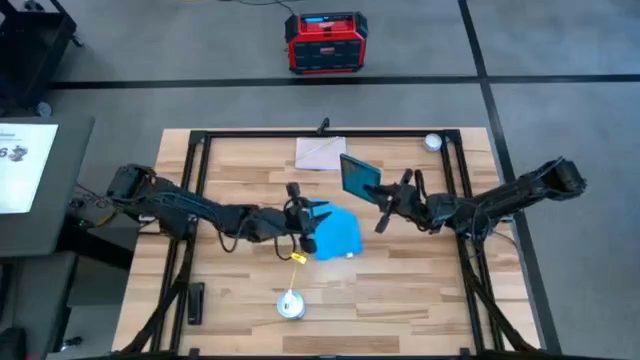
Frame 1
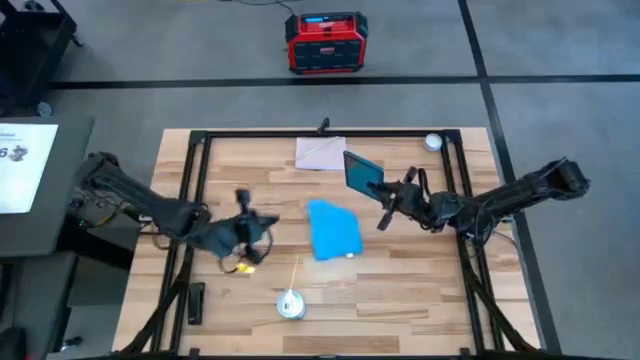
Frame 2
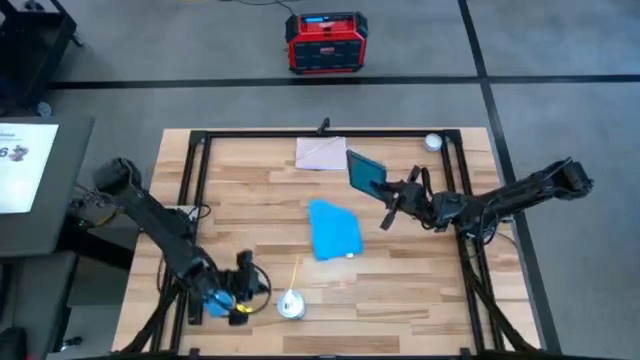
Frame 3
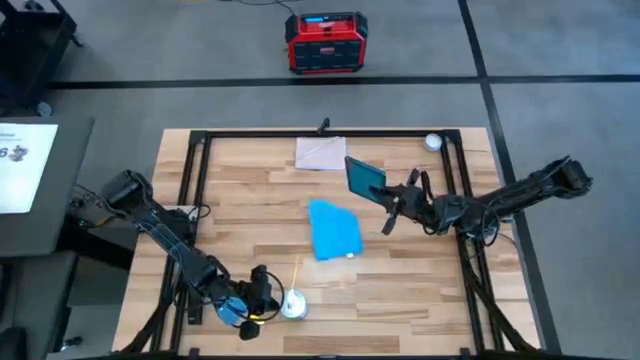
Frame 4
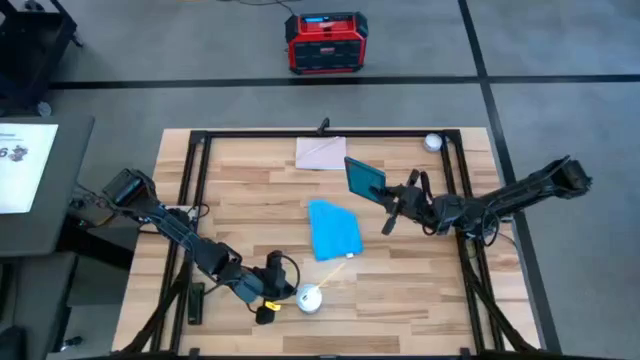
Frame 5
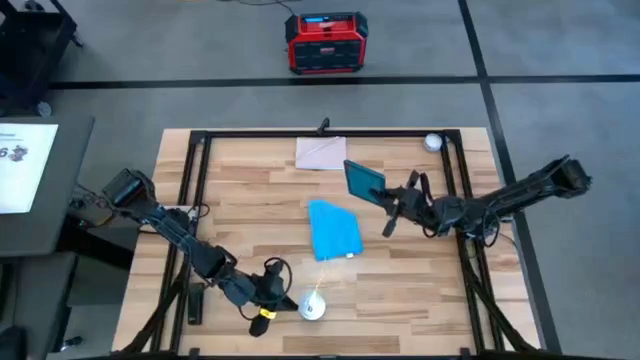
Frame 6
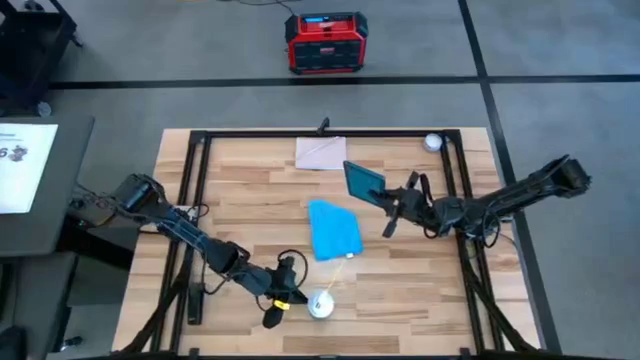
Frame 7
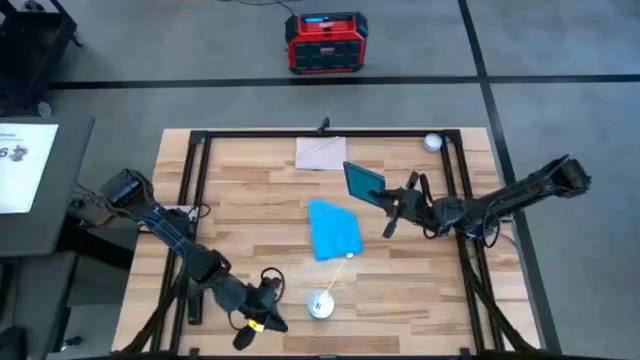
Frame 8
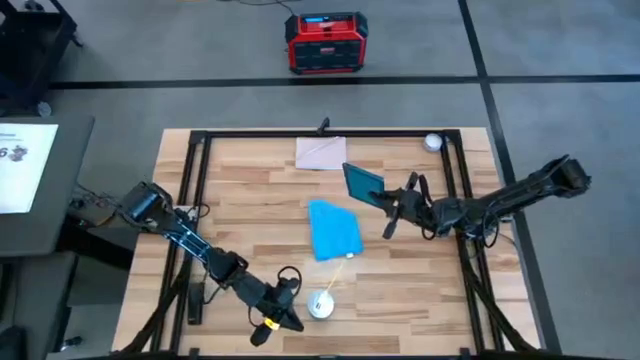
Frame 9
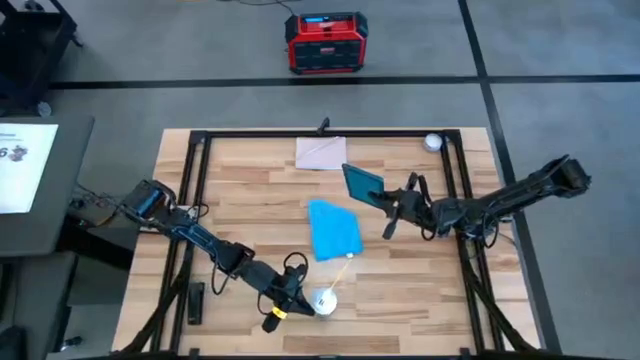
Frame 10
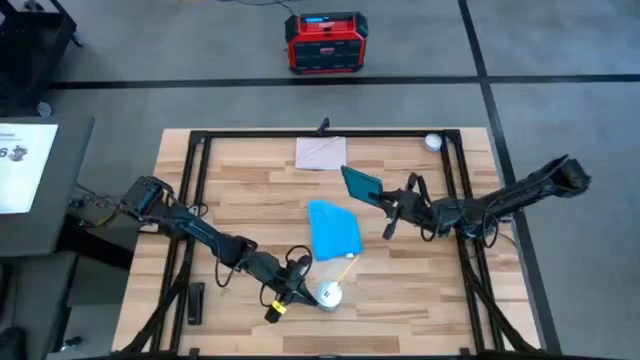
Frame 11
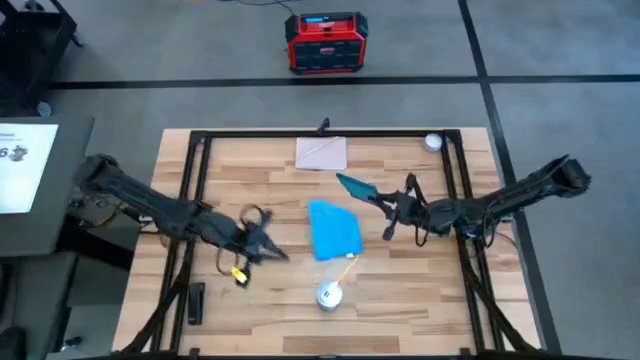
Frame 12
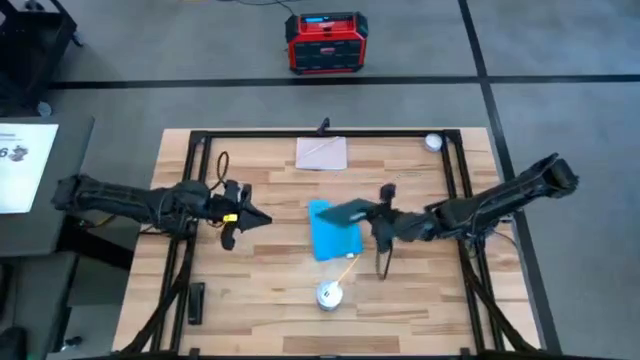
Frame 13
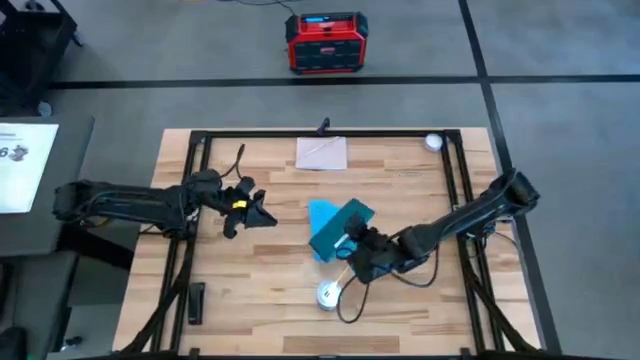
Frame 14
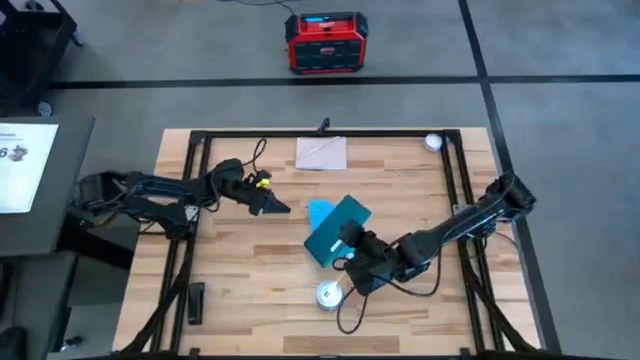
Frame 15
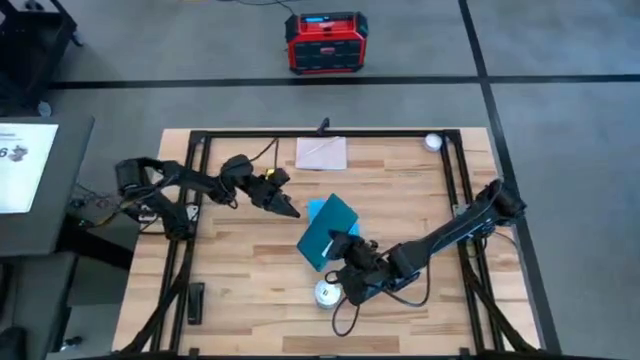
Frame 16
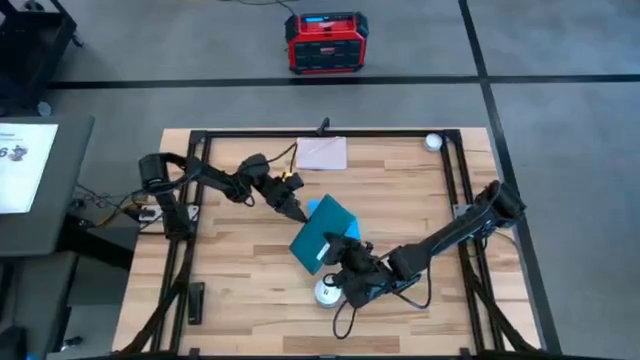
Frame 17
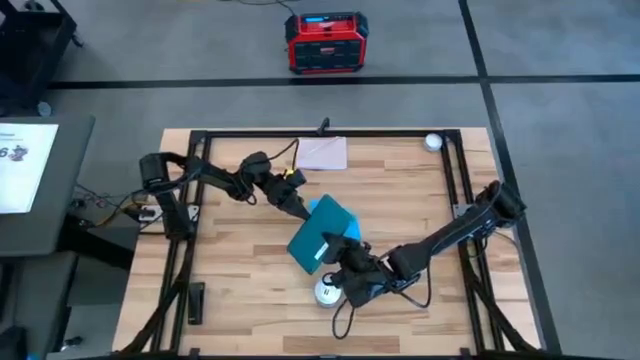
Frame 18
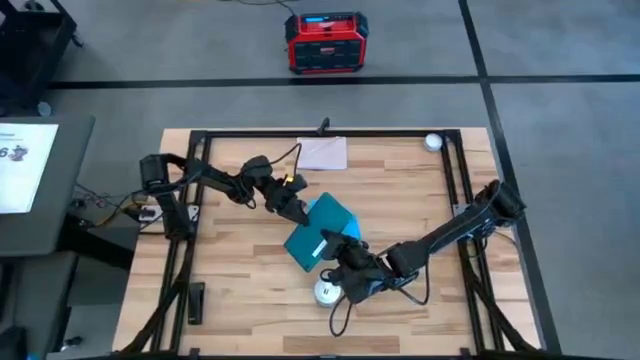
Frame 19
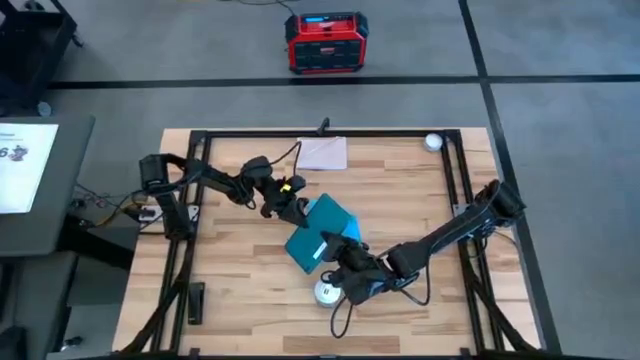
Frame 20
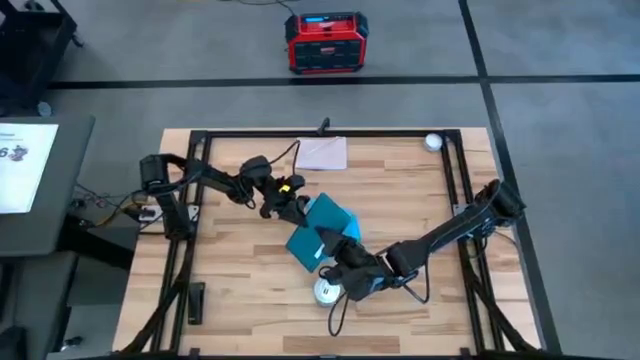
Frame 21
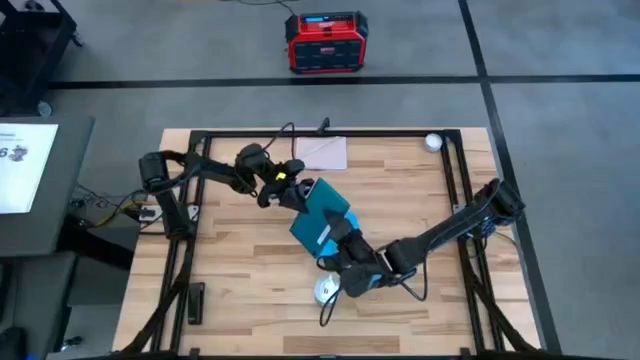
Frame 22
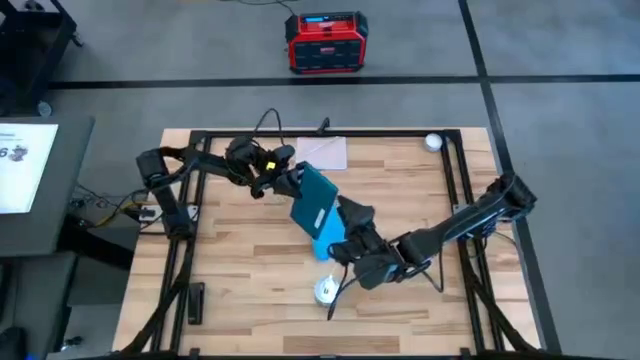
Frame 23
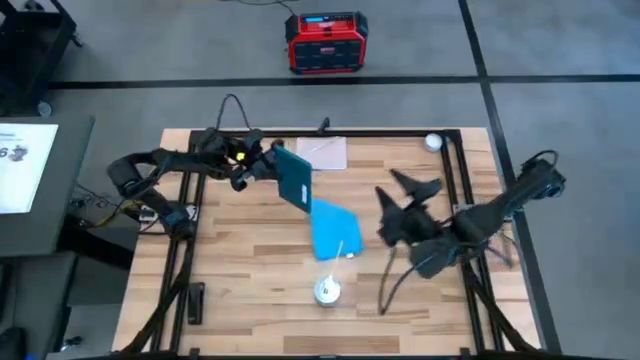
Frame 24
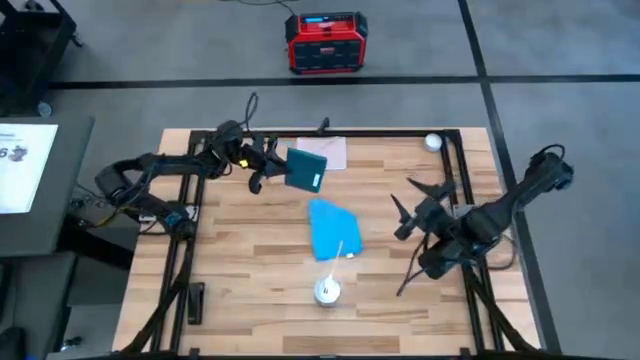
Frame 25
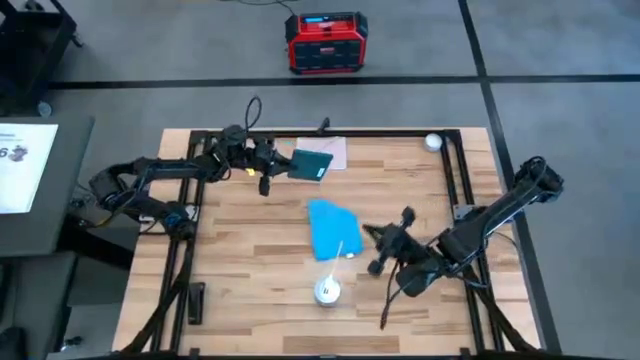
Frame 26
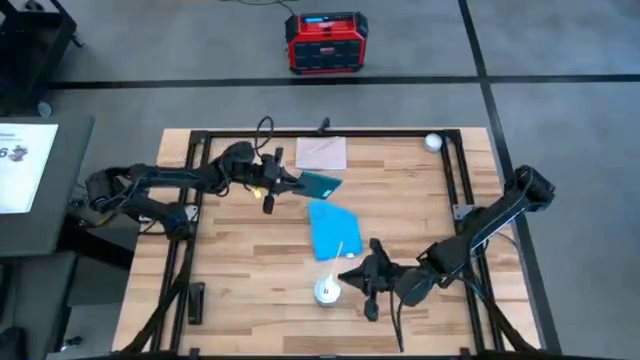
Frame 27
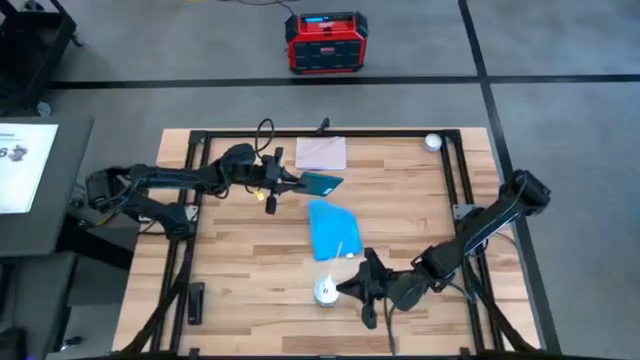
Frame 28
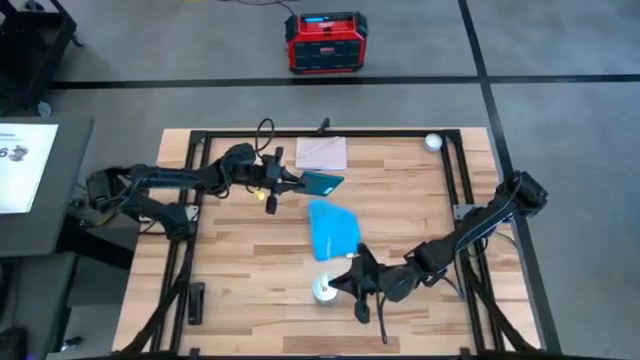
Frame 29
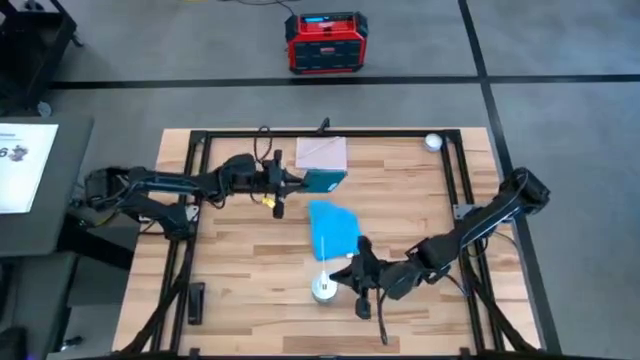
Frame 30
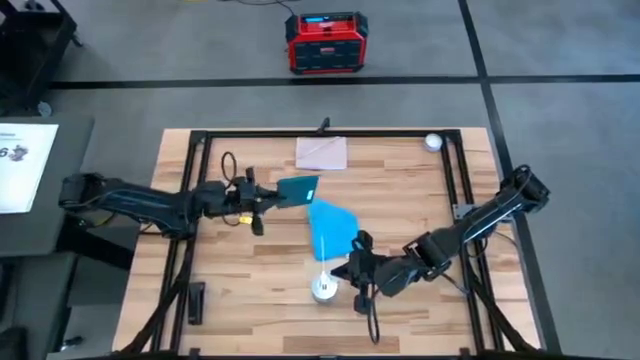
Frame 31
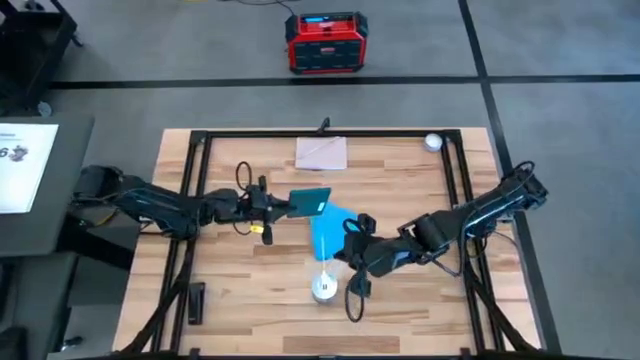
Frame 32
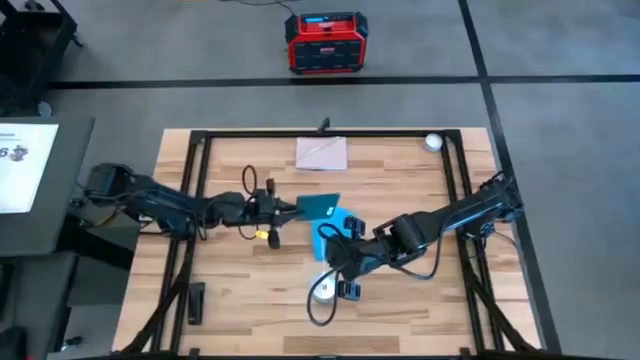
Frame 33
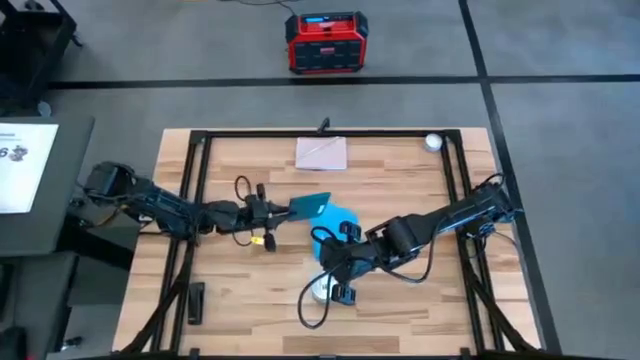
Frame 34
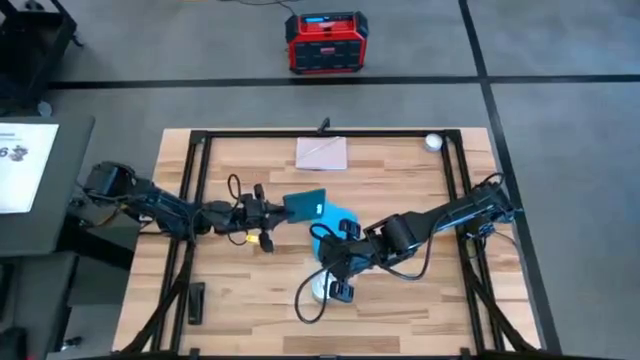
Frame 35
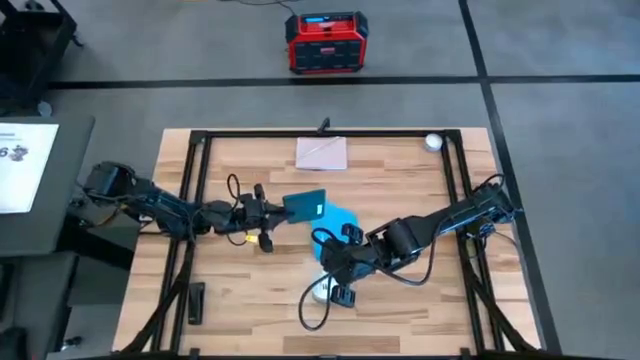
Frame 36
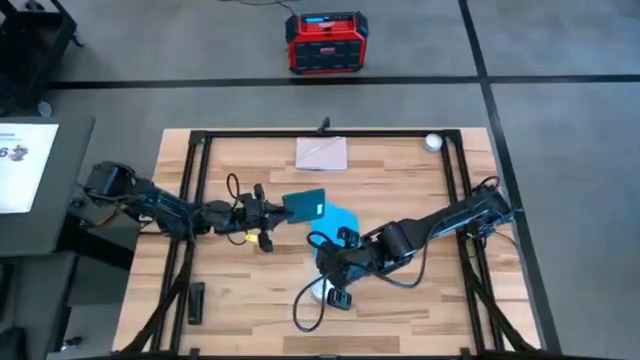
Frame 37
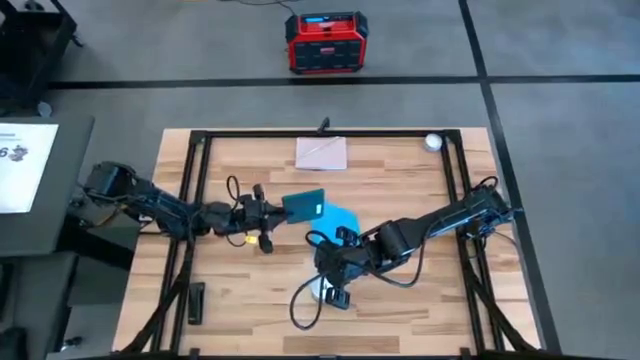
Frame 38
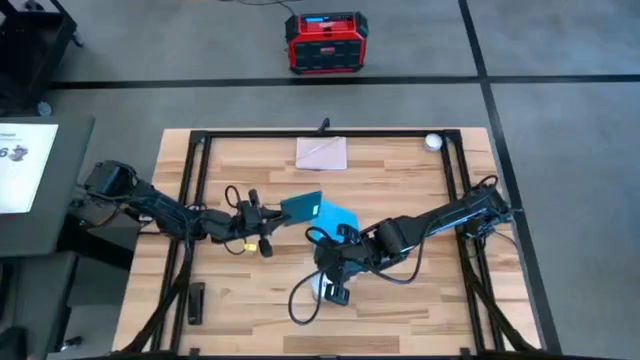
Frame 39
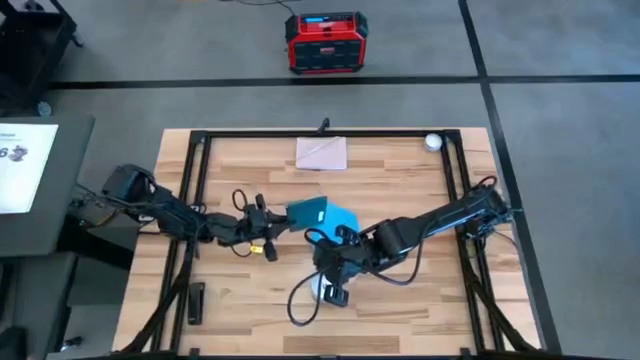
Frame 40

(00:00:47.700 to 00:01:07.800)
Task: Apply microfiber cloth
Spray the back of the tablet using the spray bottle

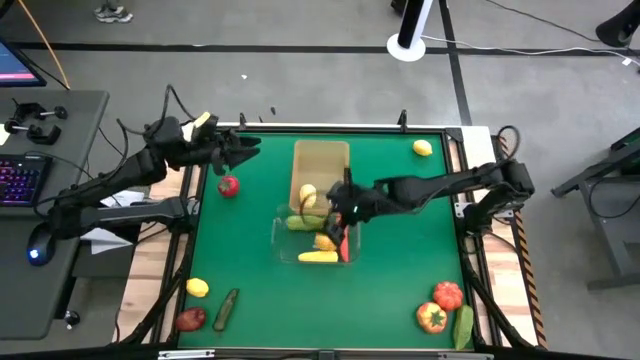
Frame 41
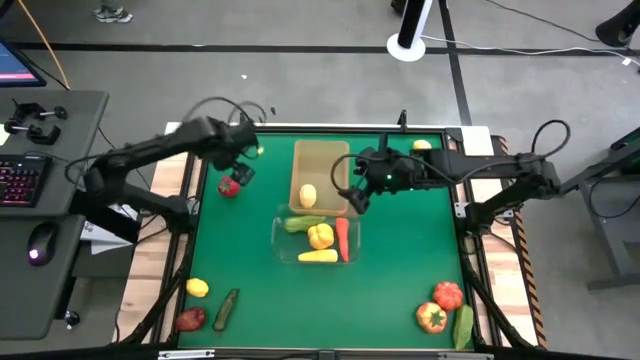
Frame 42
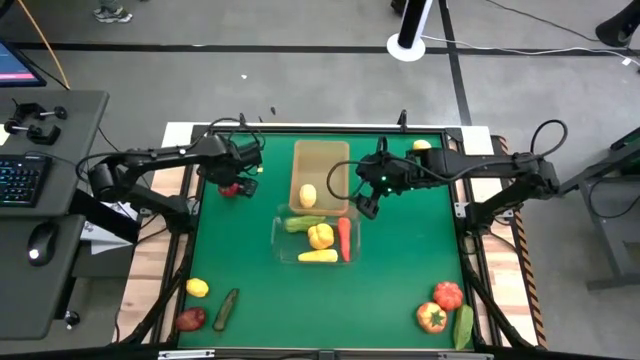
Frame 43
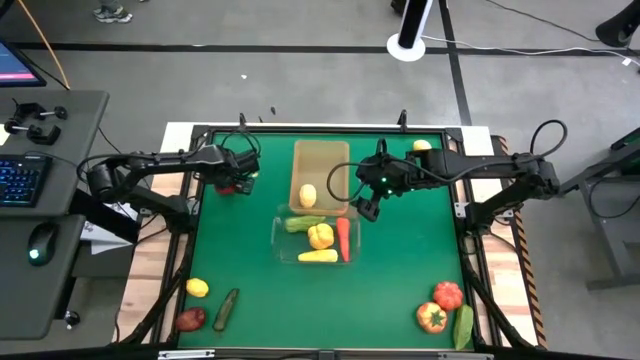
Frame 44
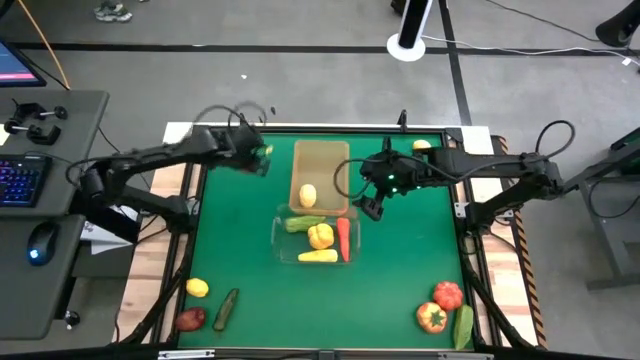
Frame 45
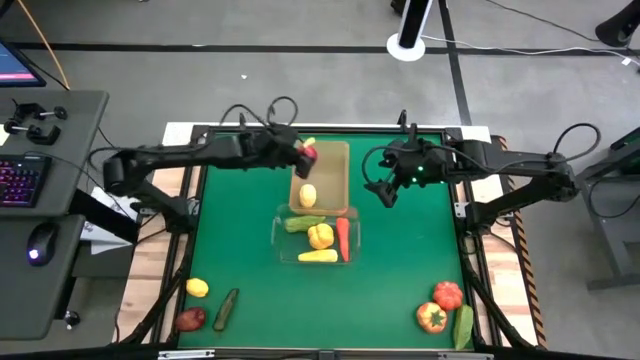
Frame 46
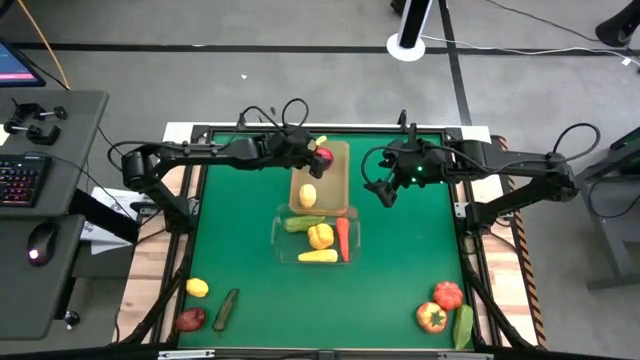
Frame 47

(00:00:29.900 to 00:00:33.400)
Task: Sort produce into baskets
Put the red tomato into the orange bin
